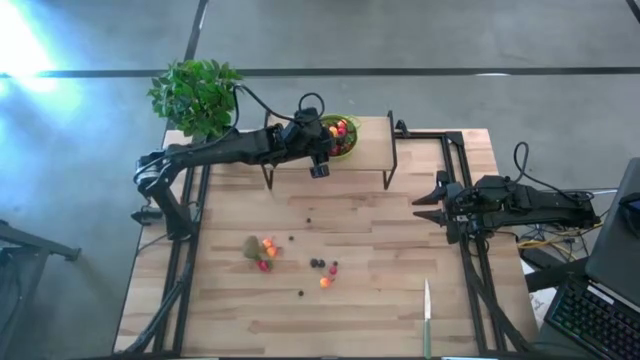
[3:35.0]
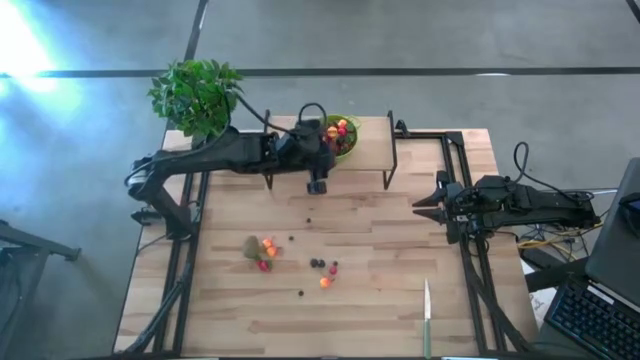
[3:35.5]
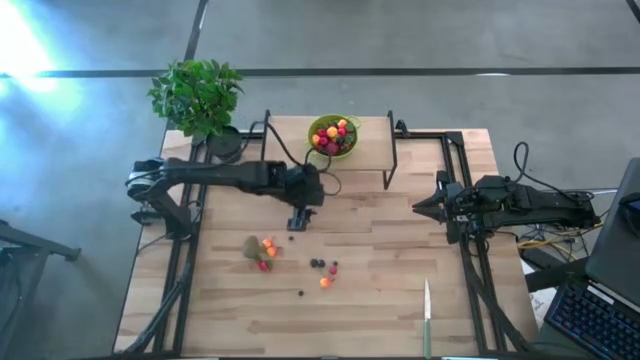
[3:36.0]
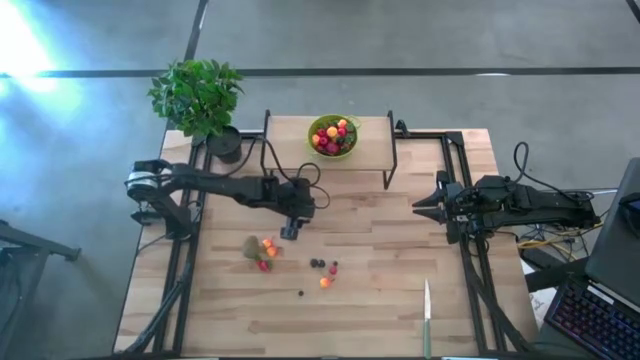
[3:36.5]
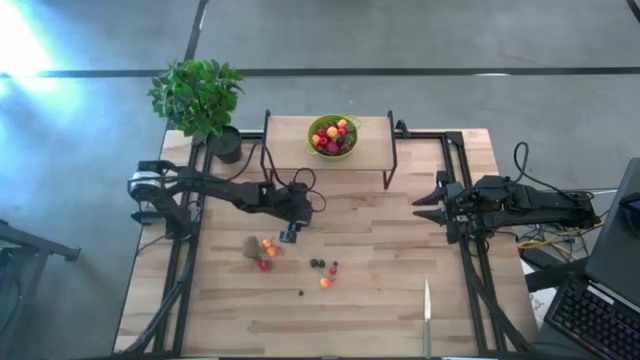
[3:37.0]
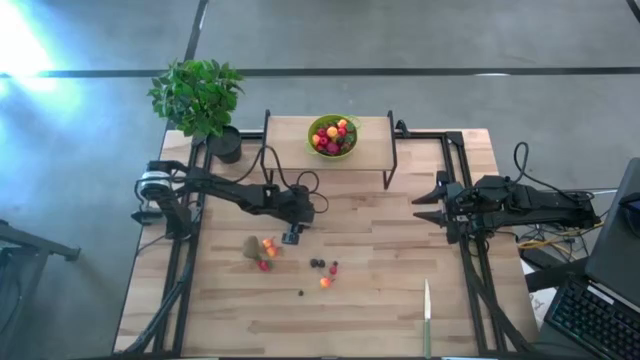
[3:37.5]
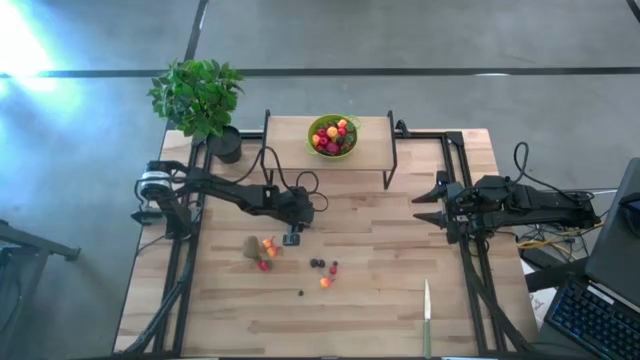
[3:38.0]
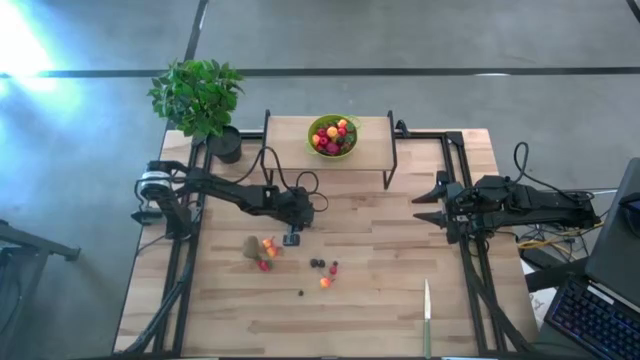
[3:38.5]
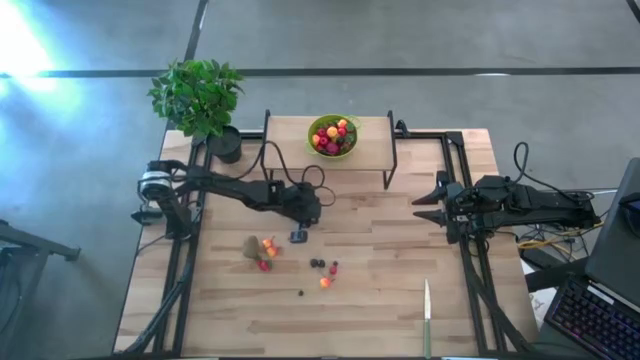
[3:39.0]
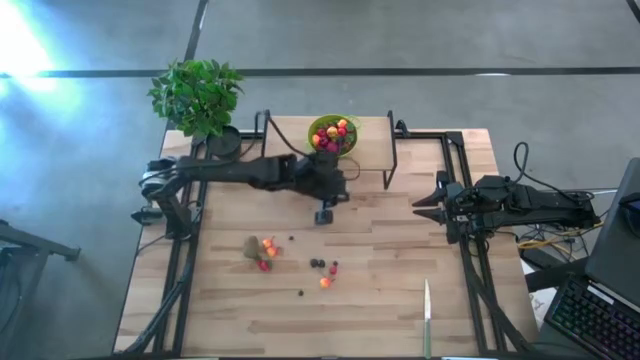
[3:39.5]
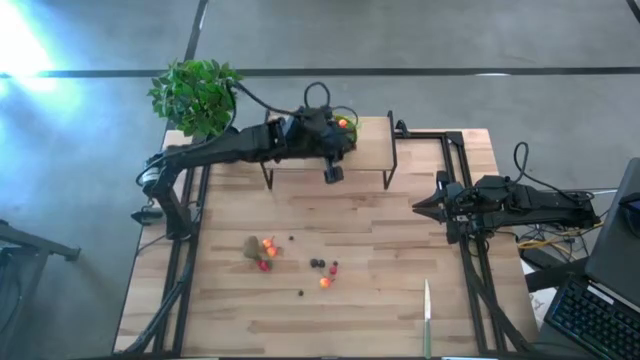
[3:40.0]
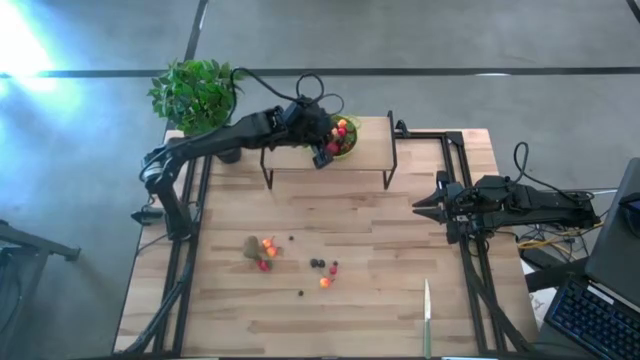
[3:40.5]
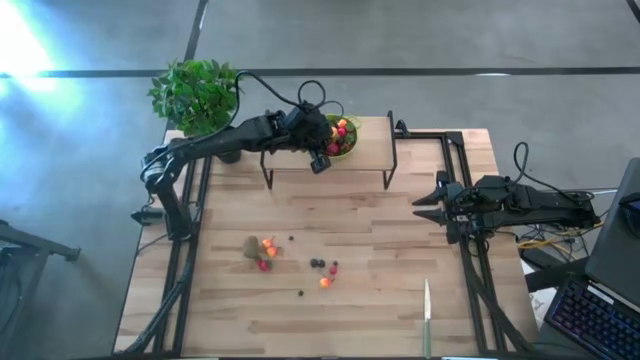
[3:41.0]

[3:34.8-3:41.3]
Task: Pick & Place Fruit
Put the blueberry into the green strainer bowl on the shelf

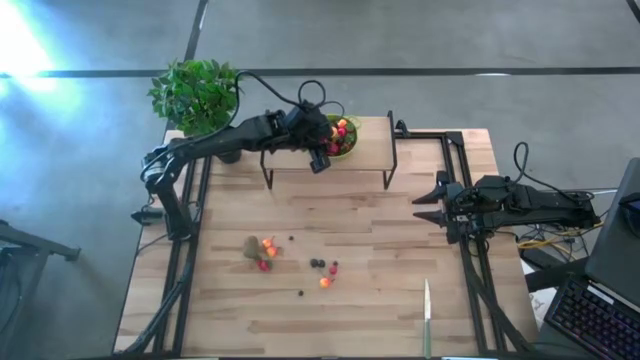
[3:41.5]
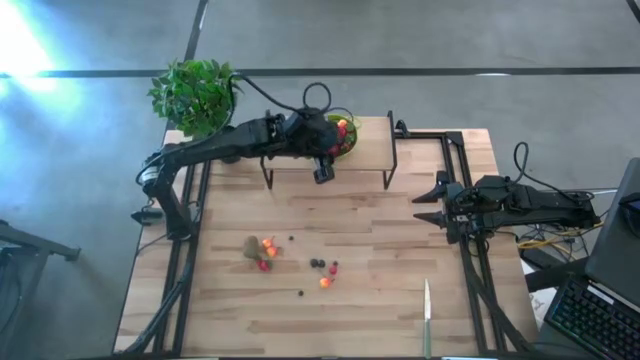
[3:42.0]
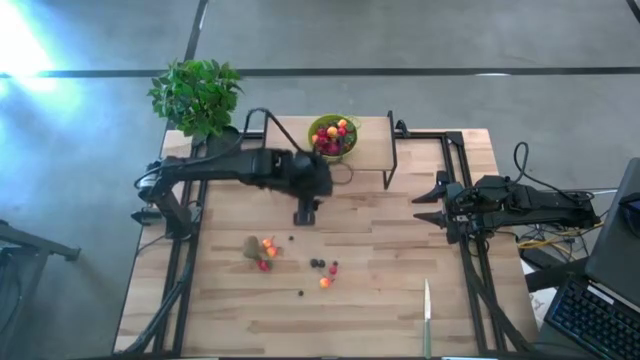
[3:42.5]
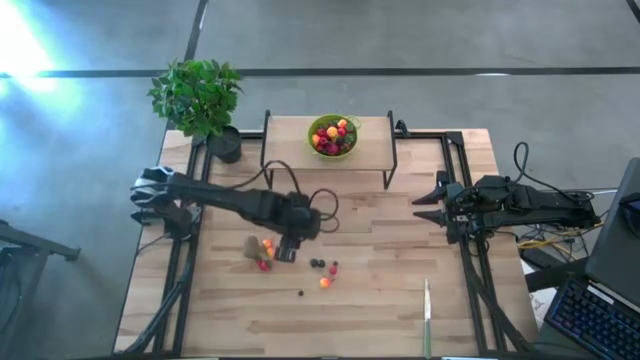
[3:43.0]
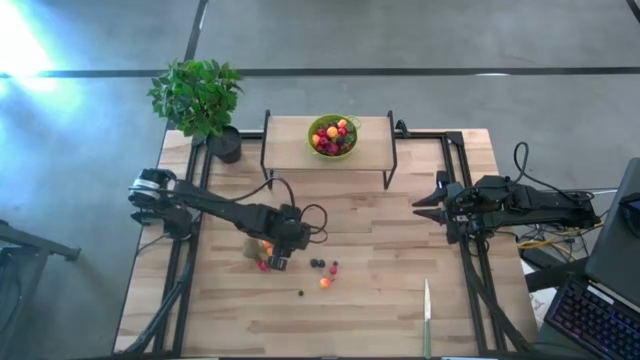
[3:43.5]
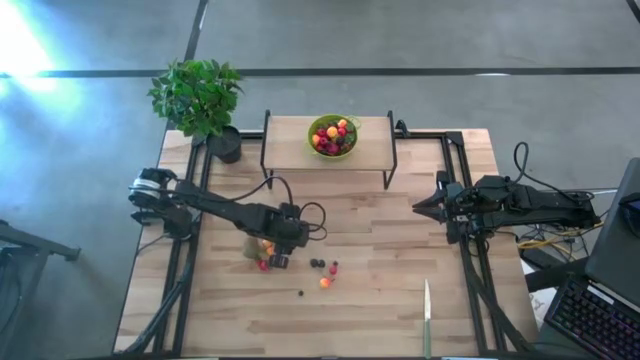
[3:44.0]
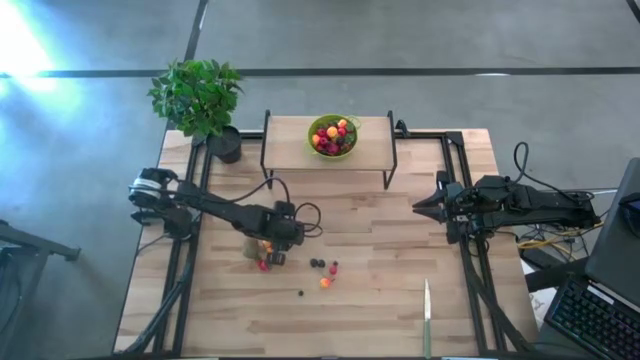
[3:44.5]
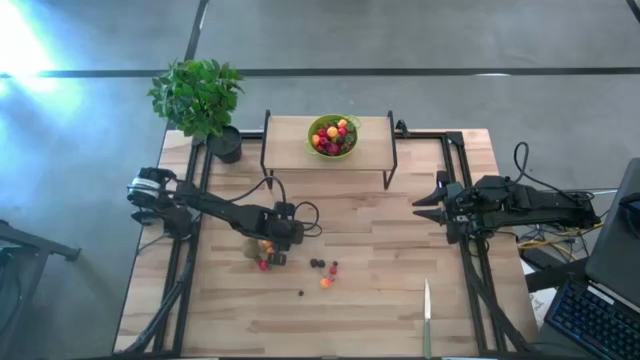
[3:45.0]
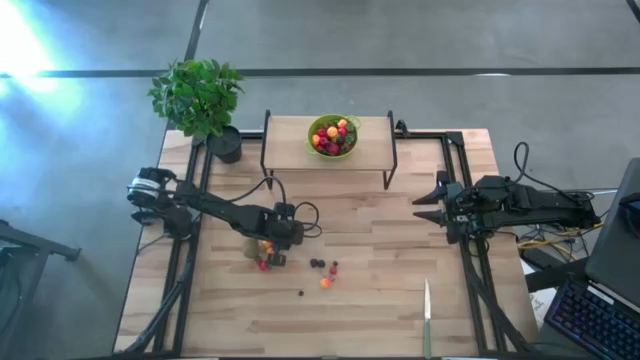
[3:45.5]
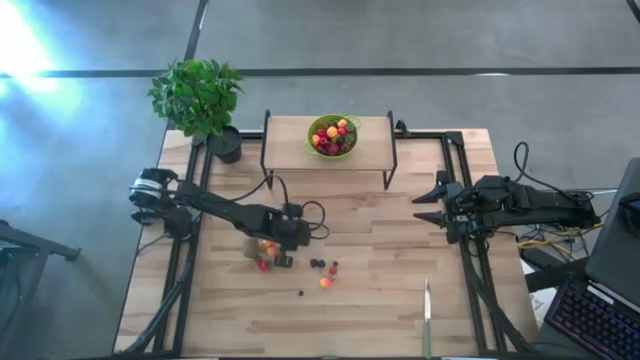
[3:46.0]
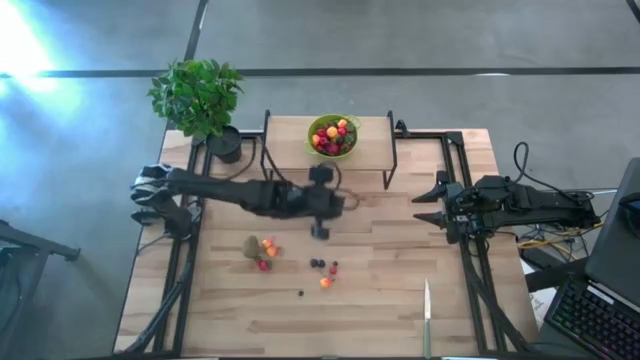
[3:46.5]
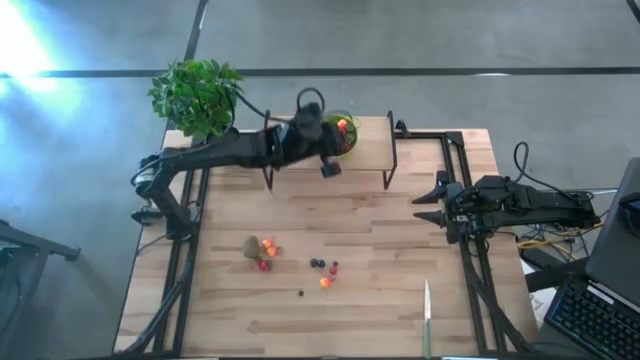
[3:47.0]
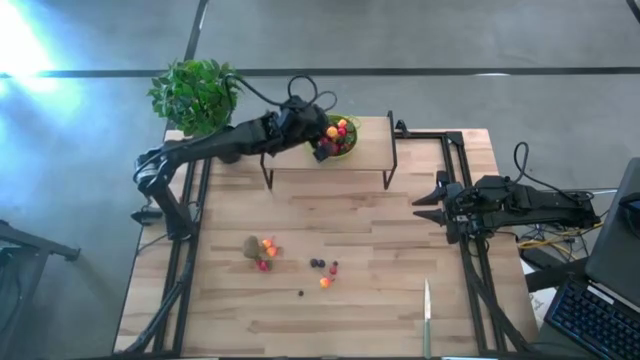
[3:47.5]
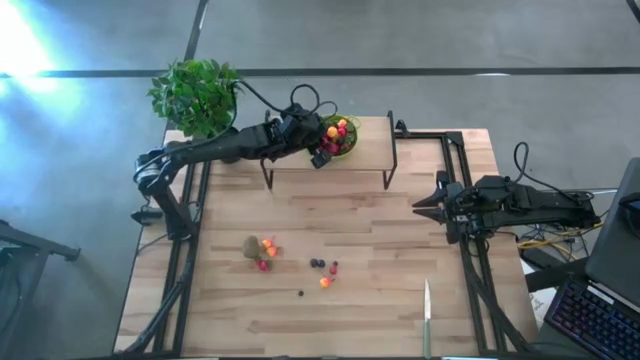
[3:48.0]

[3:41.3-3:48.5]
Put the blueberry into the green strainer bowl on the shelf

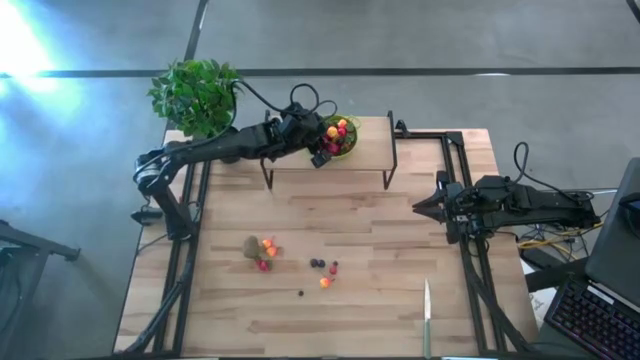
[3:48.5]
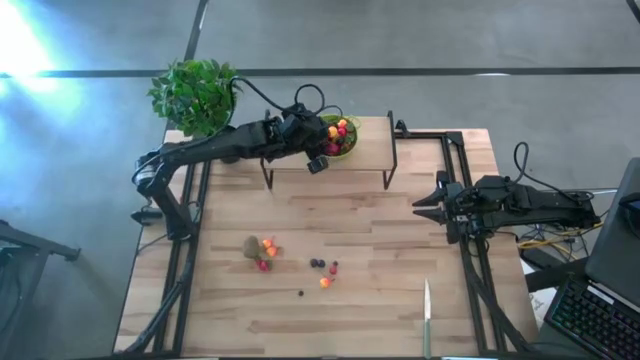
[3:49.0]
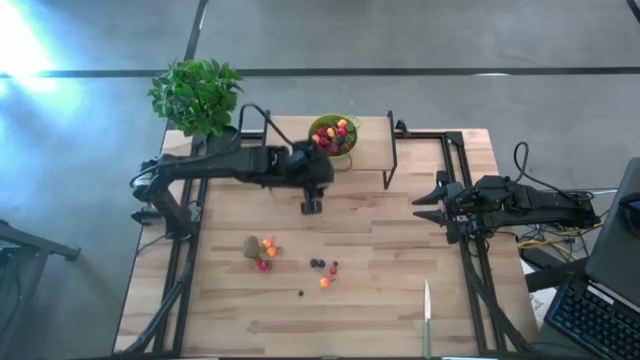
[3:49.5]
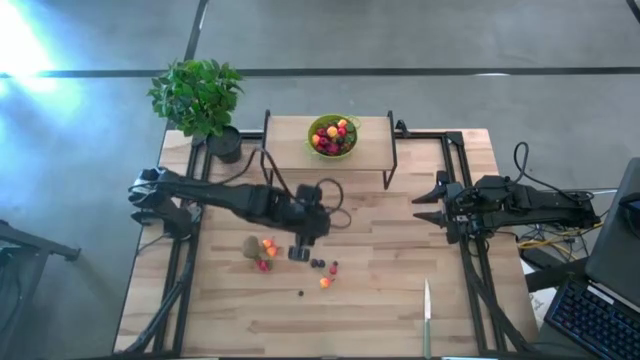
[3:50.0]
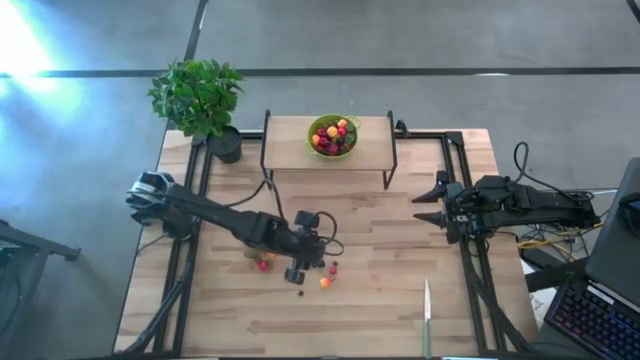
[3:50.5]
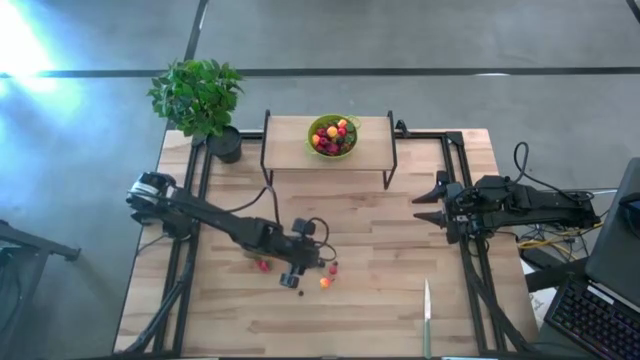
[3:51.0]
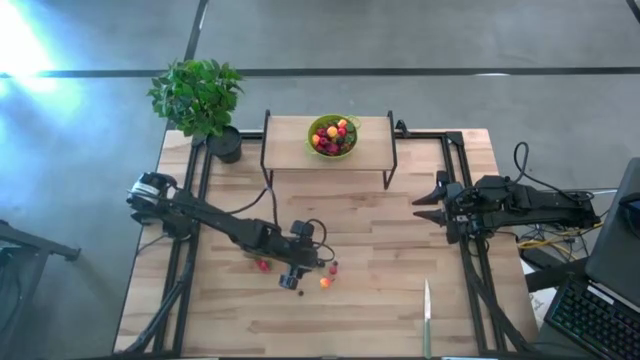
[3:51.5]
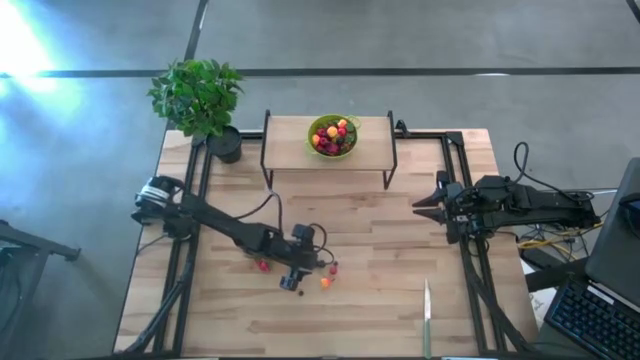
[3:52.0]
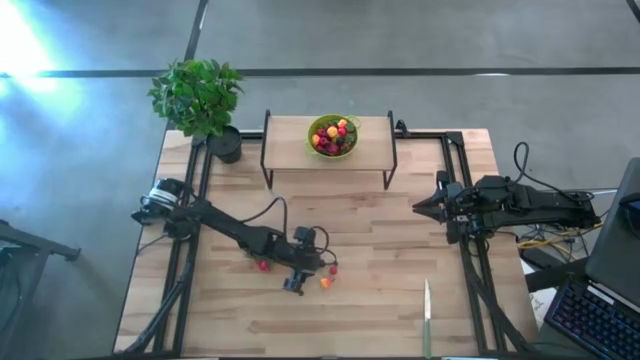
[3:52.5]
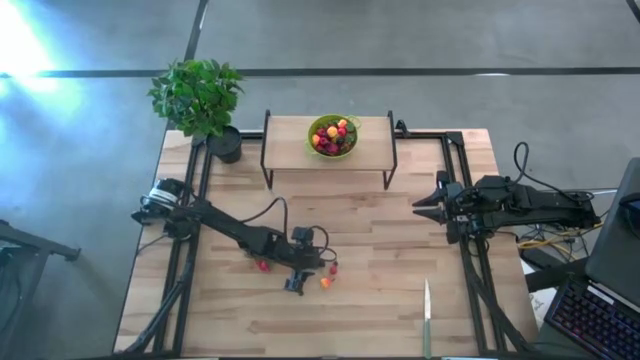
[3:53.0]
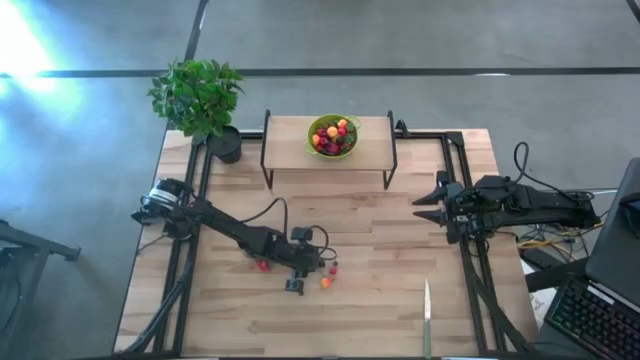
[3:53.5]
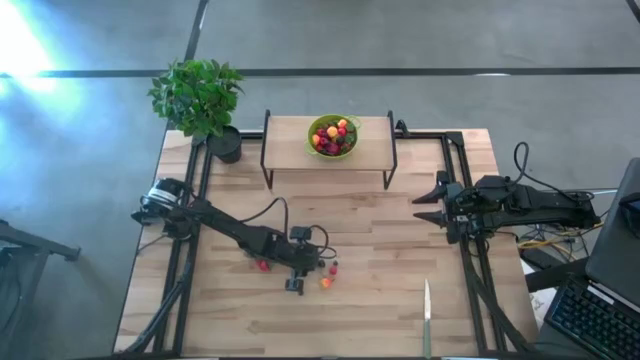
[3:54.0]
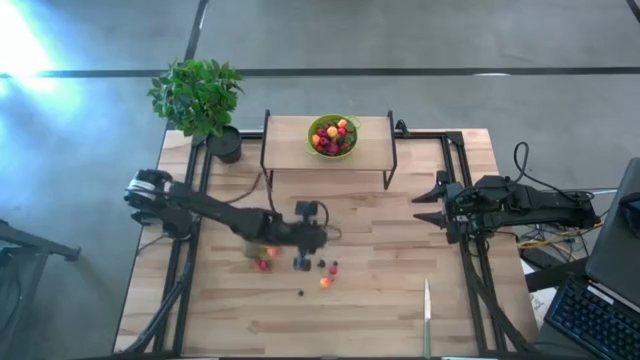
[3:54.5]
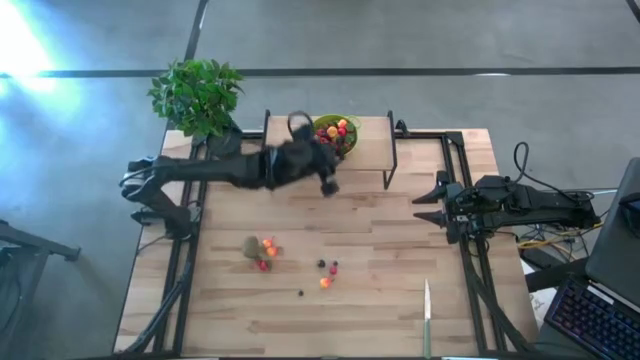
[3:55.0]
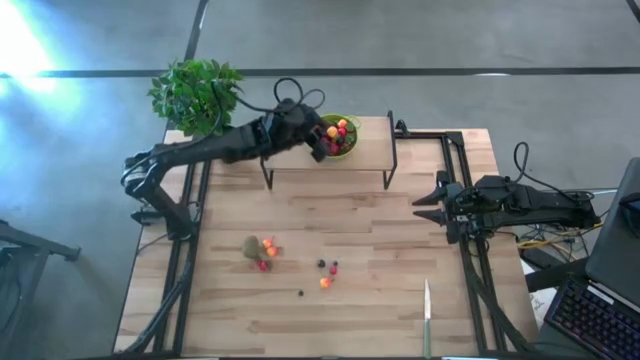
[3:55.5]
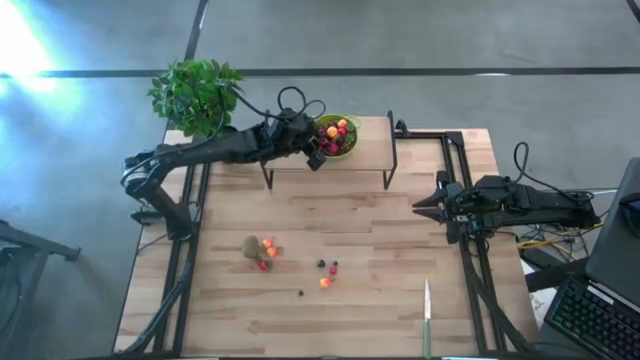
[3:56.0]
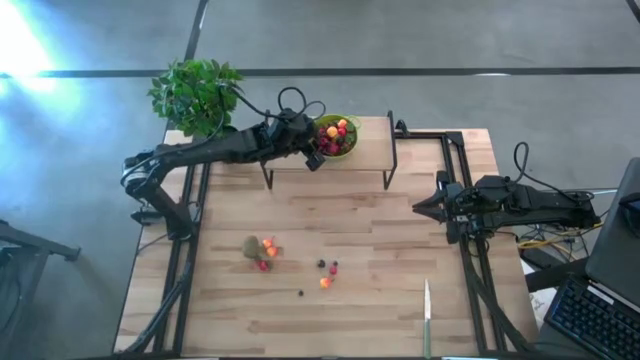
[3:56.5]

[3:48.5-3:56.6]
Put the blackberry into the green strainer bowl on the shelf
